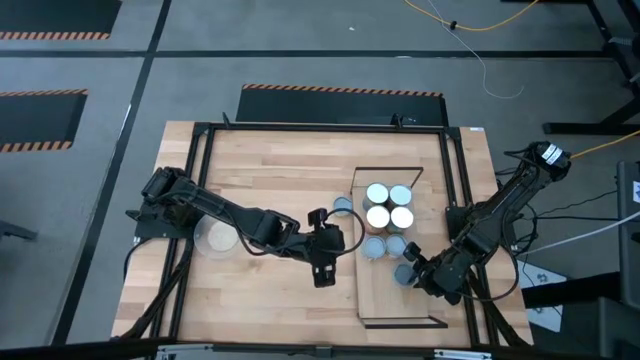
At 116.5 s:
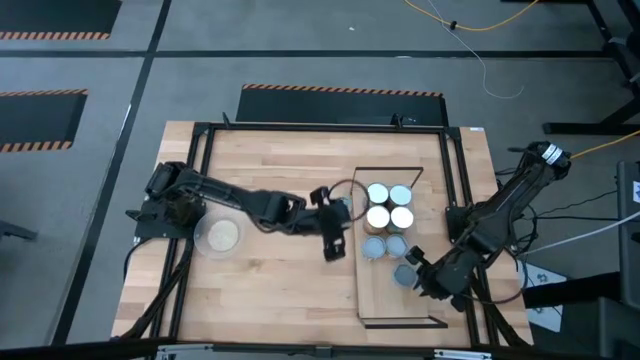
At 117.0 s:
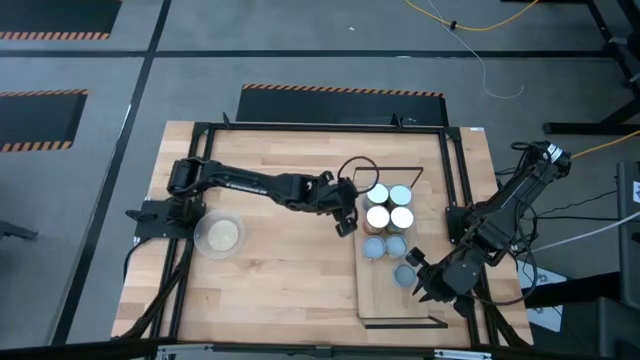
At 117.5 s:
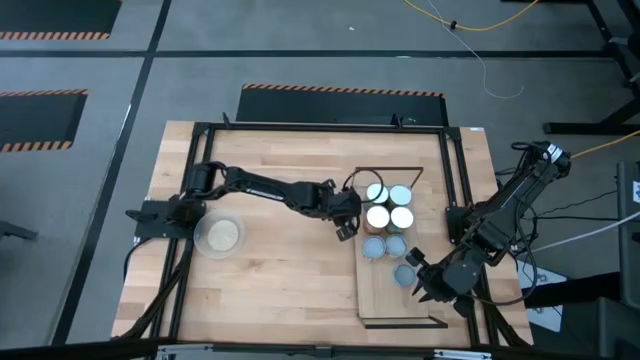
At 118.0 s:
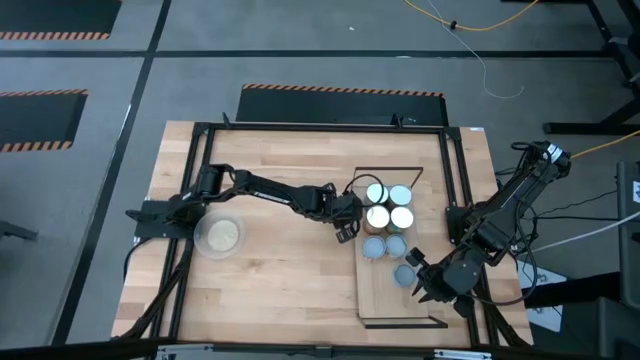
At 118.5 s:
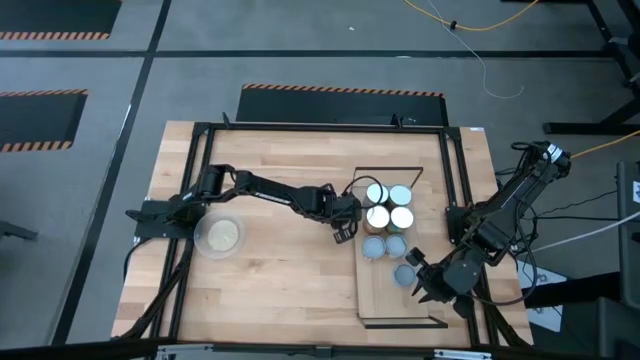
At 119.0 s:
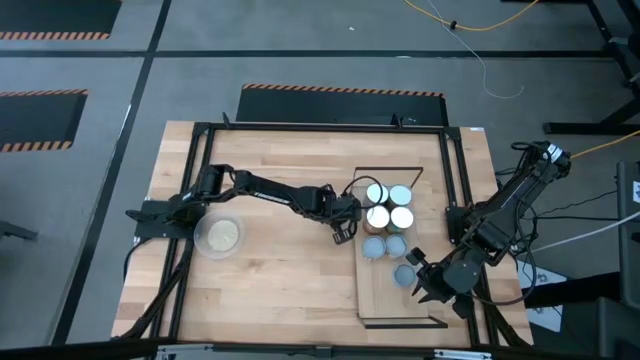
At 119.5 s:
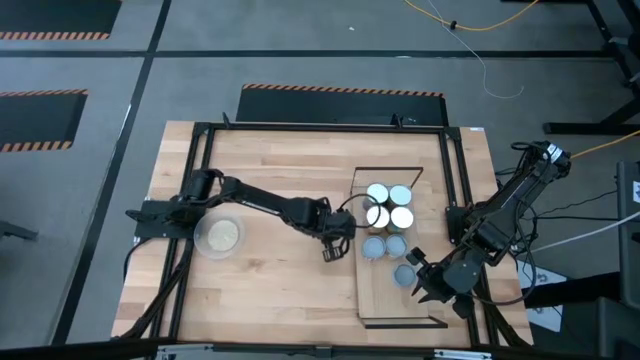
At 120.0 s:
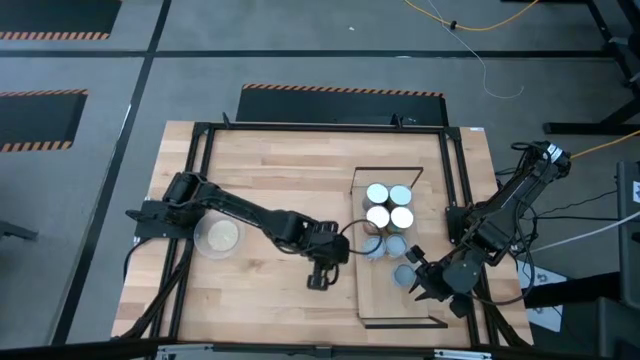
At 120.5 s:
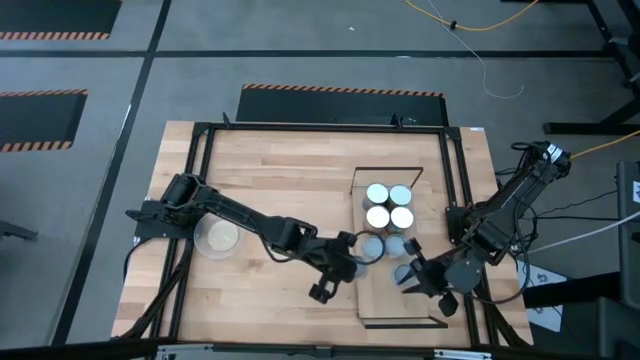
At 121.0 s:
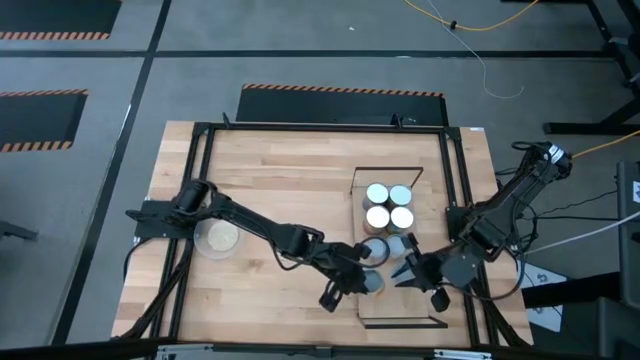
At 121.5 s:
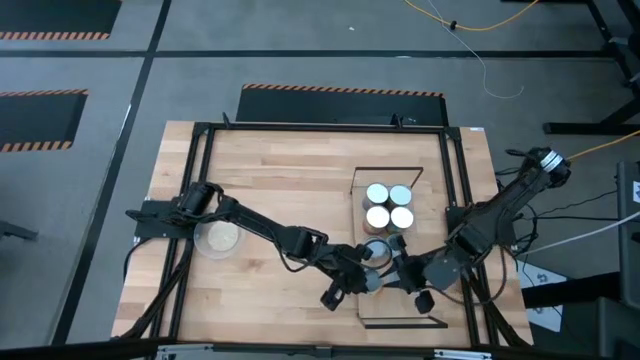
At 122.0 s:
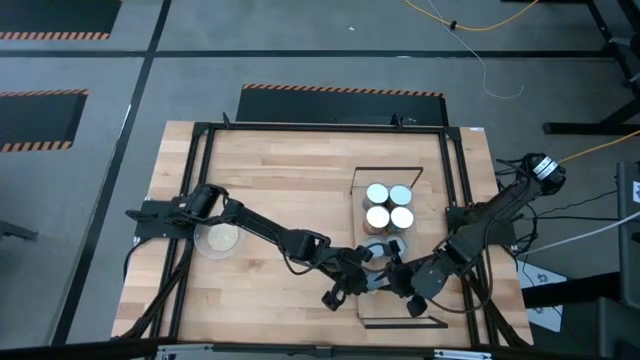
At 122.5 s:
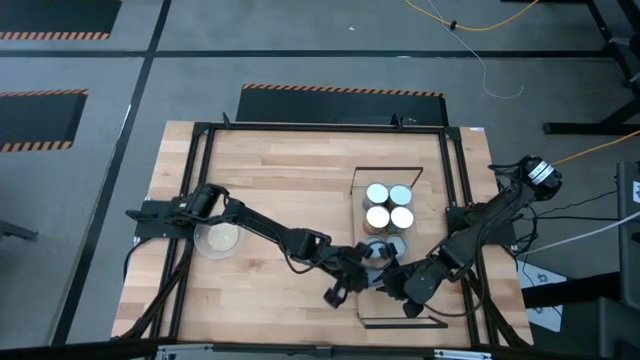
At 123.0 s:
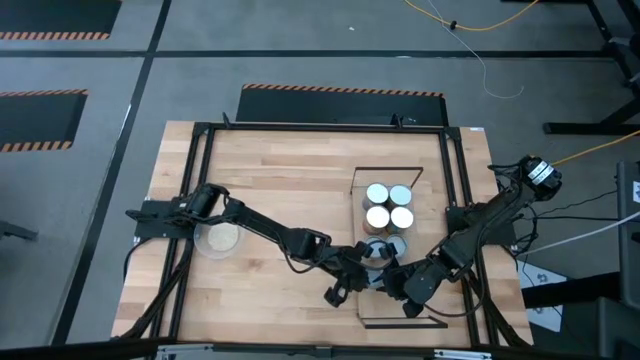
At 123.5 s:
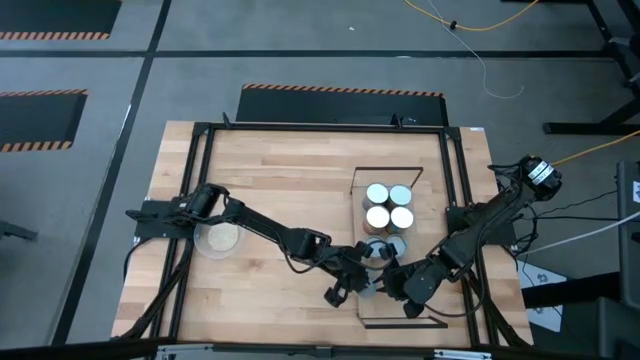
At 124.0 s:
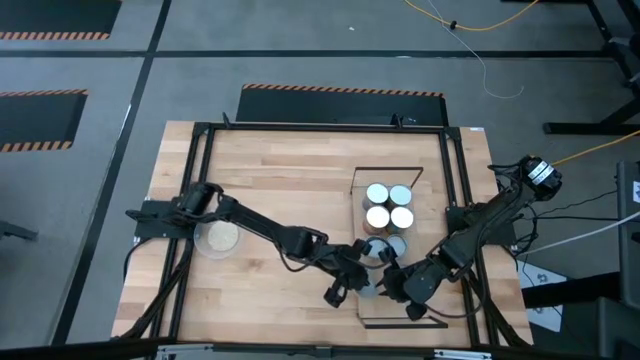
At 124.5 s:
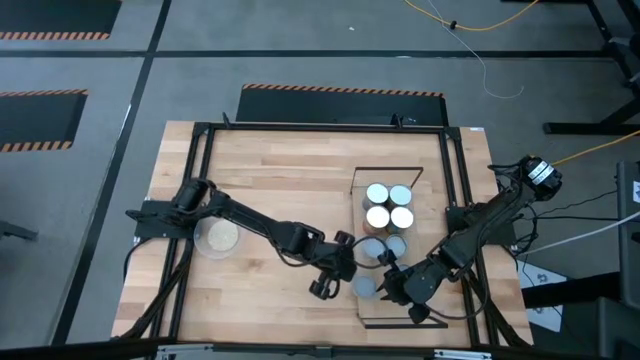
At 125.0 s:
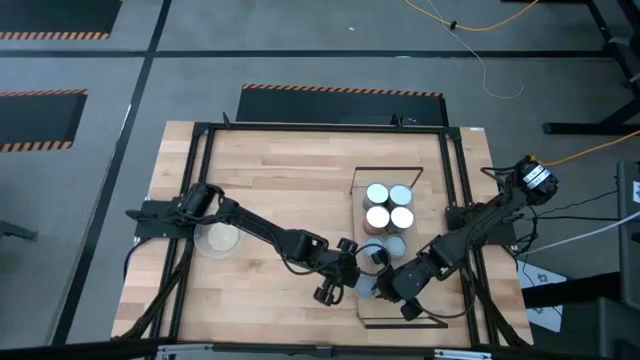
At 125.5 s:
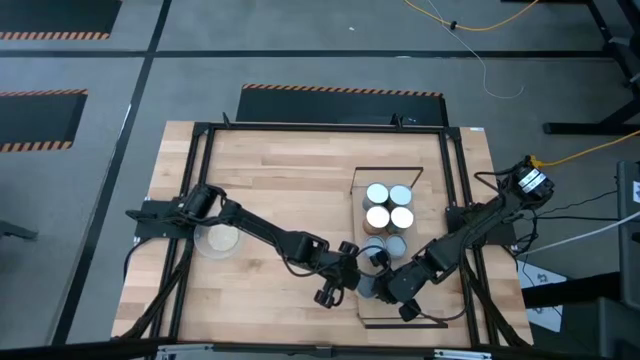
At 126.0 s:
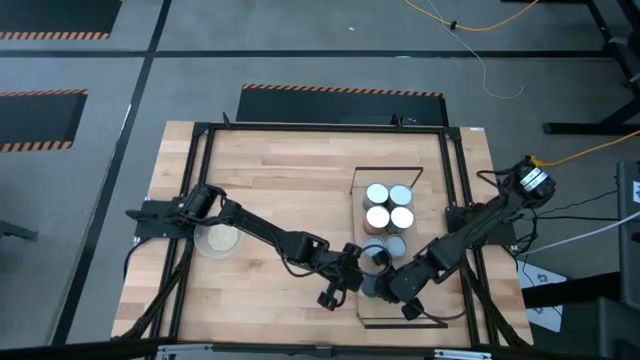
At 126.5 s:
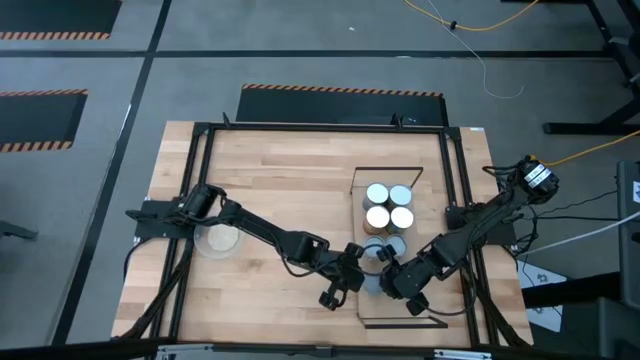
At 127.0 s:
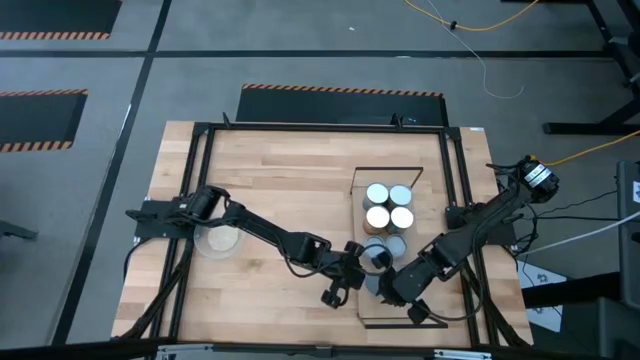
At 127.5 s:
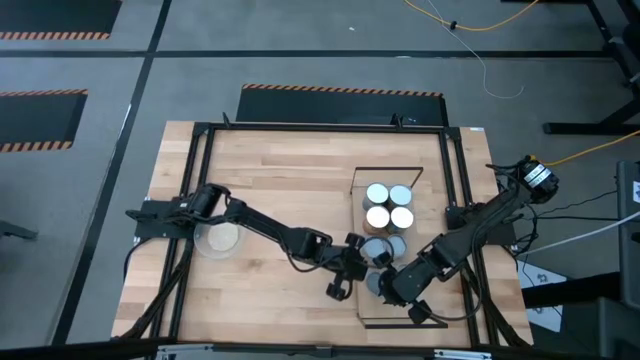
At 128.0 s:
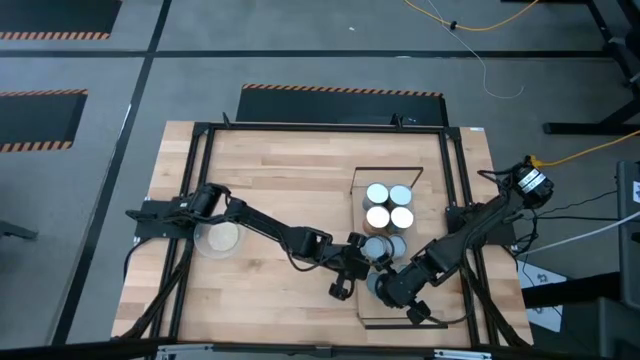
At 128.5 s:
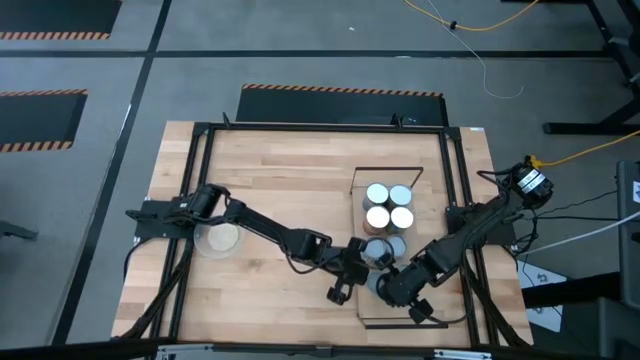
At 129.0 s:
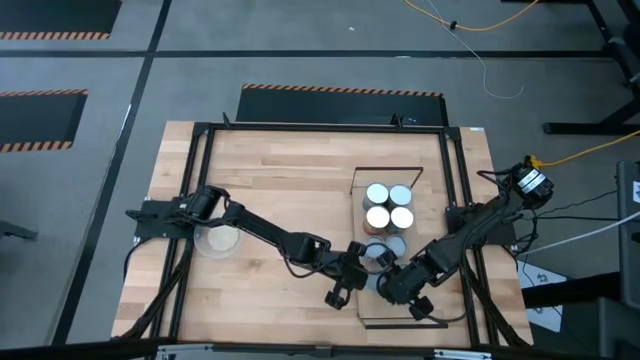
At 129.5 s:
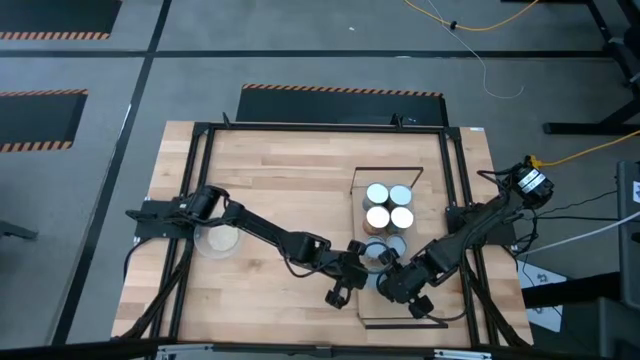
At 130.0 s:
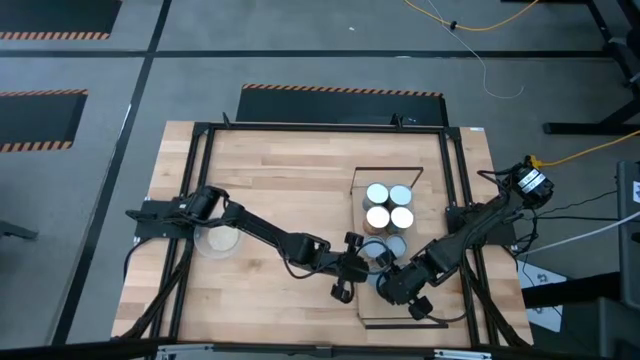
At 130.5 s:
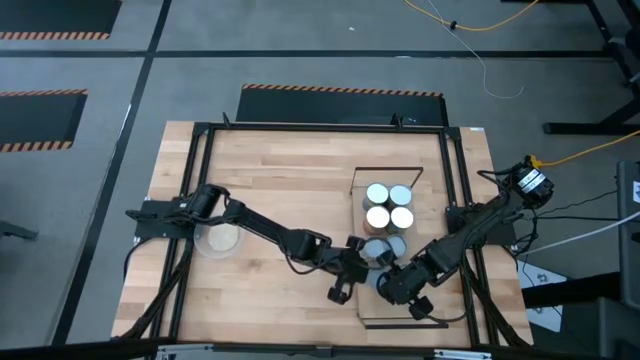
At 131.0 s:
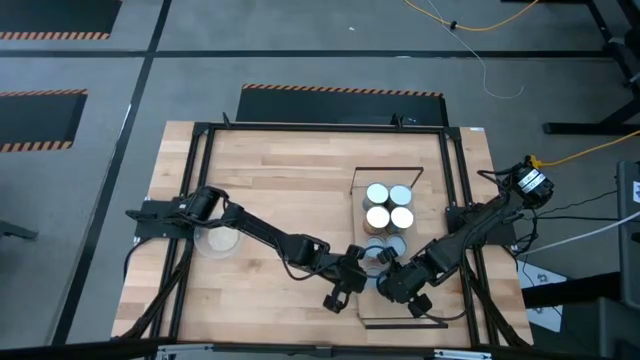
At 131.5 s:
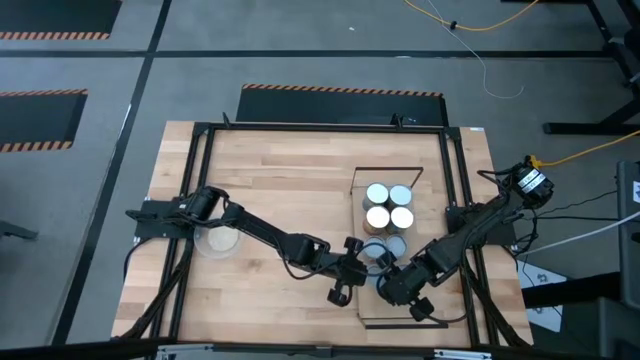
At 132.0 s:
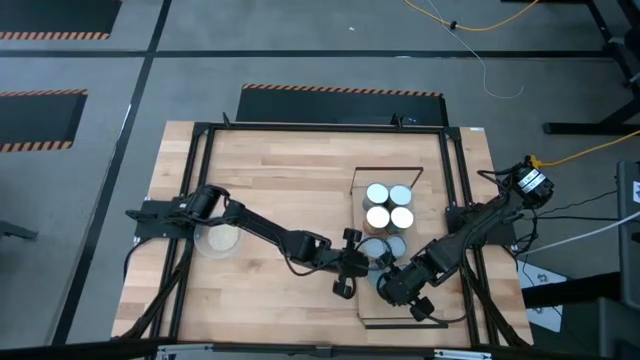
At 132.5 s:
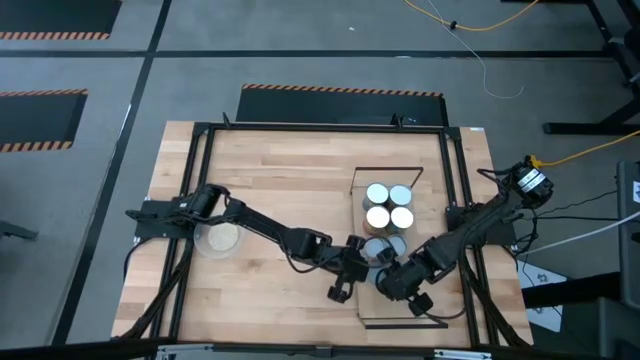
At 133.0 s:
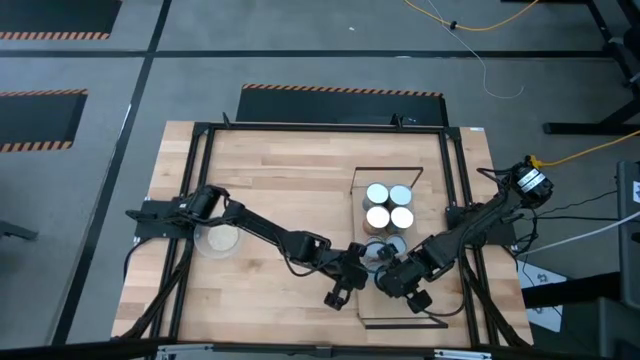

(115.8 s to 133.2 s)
Task: Pick and place cans onto a shelf
Put the yellow can onto the shelf

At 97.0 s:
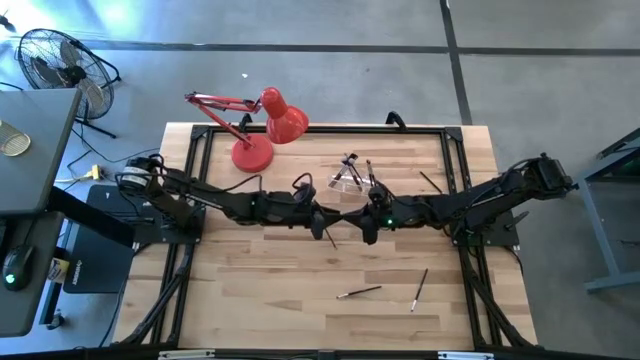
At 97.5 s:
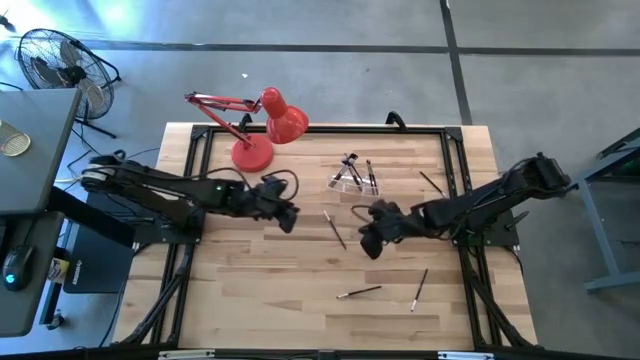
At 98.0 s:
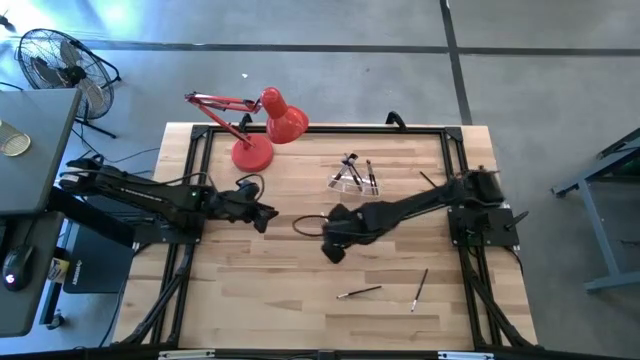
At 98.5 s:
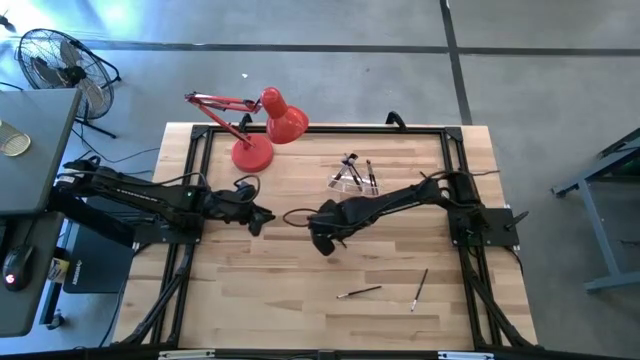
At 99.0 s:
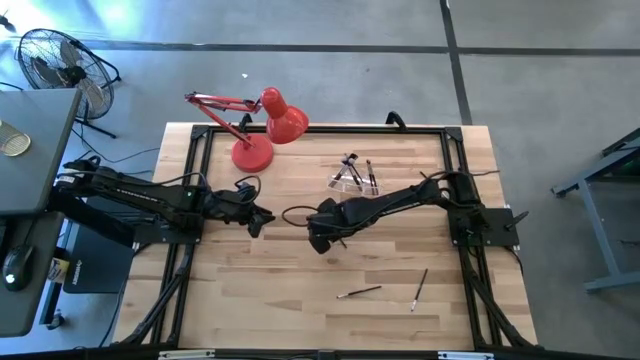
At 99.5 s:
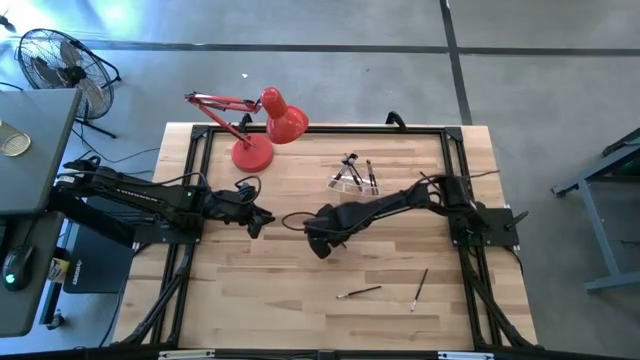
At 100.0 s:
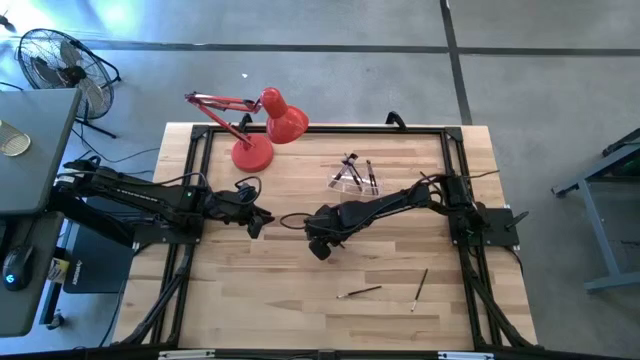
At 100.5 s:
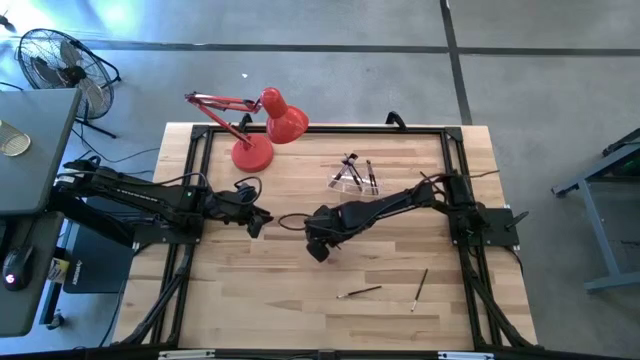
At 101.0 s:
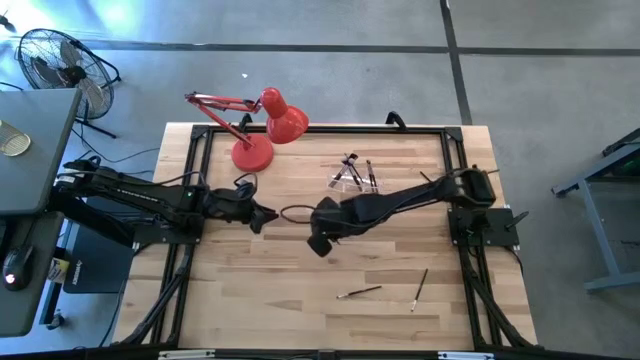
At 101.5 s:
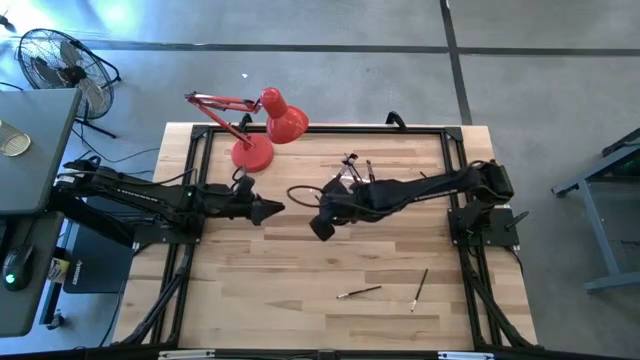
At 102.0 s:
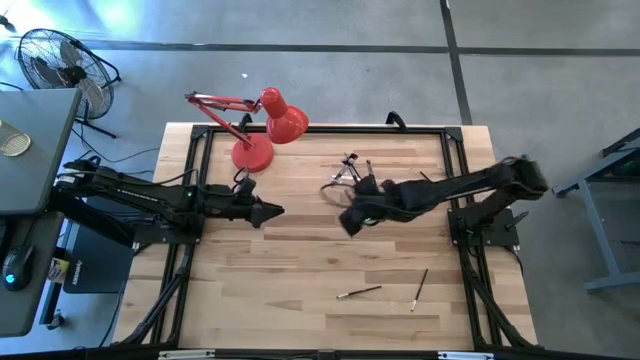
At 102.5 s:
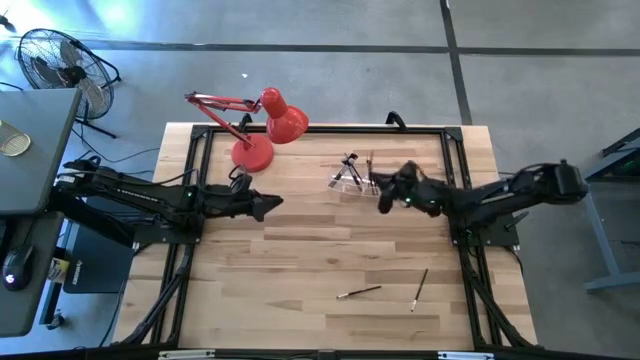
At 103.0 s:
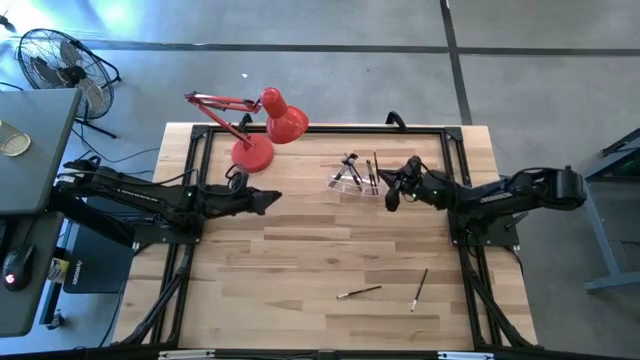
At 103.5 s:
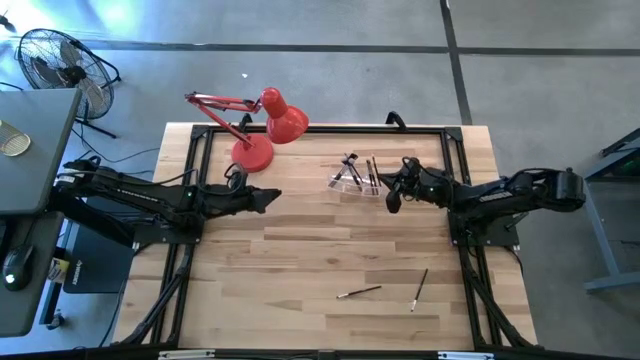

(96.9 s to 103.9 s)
Task: Put items in baskets/containers
Put the eyeshadow brush into the transparent organizer
